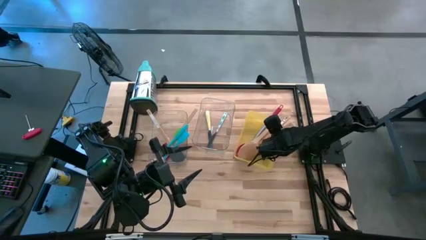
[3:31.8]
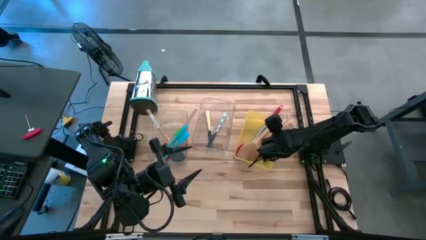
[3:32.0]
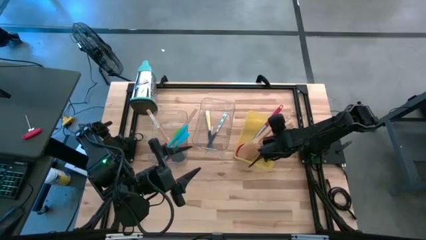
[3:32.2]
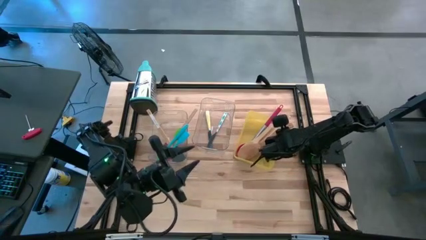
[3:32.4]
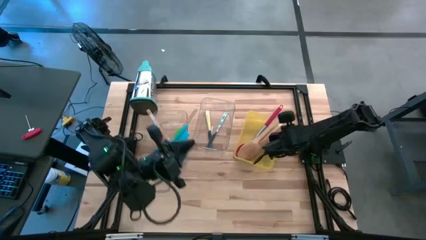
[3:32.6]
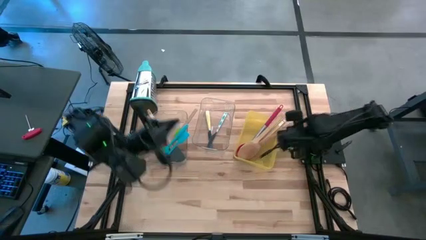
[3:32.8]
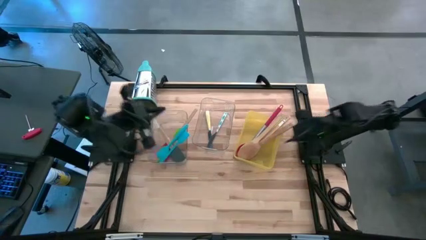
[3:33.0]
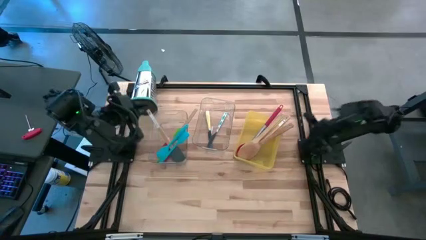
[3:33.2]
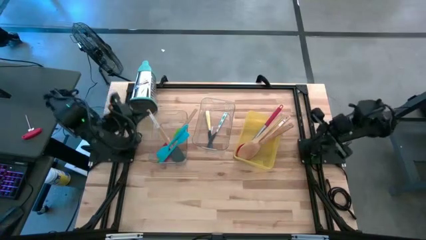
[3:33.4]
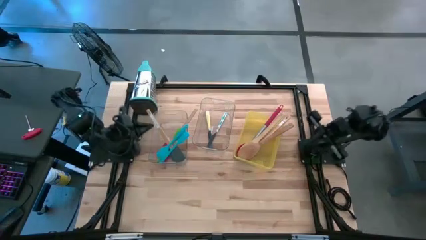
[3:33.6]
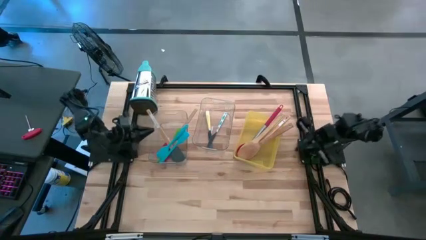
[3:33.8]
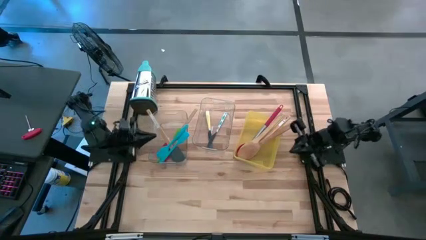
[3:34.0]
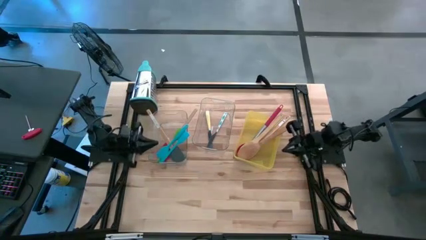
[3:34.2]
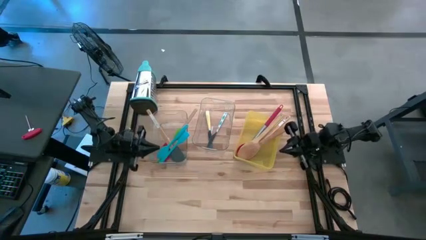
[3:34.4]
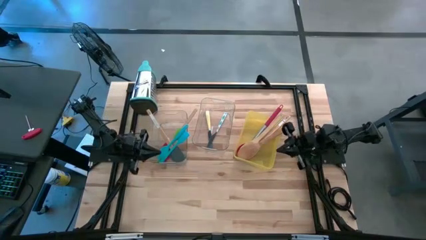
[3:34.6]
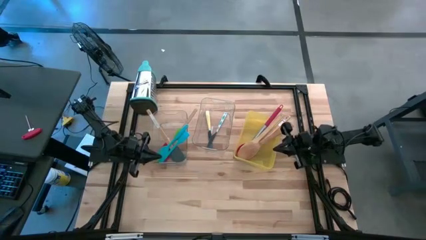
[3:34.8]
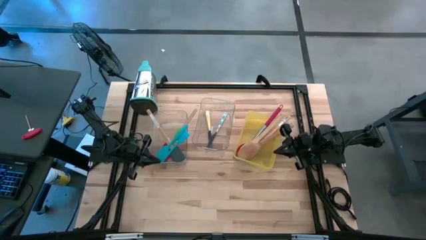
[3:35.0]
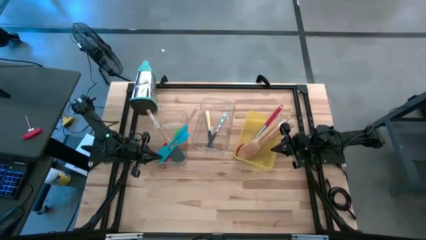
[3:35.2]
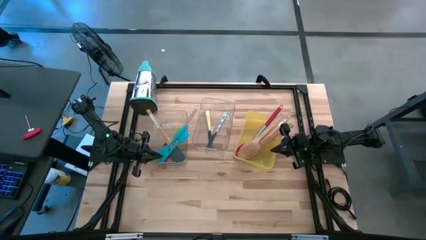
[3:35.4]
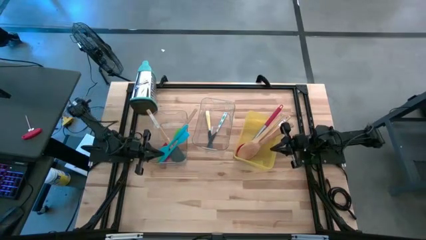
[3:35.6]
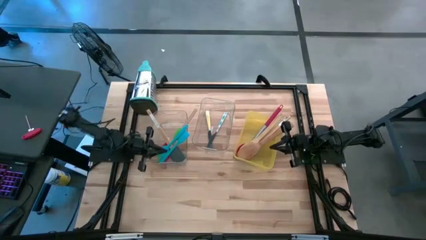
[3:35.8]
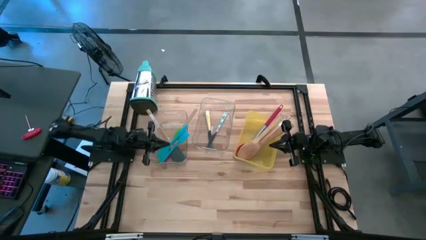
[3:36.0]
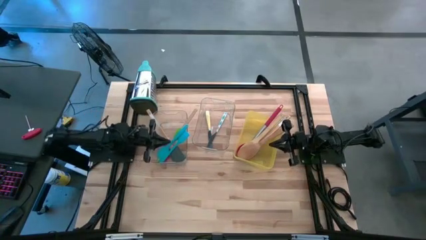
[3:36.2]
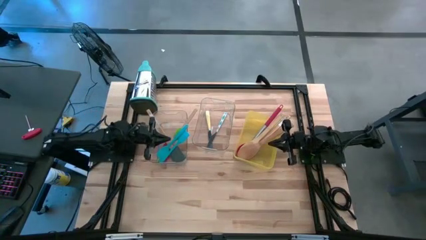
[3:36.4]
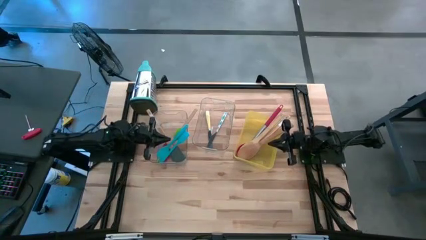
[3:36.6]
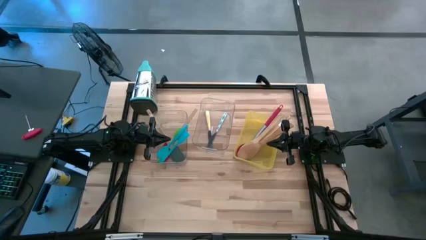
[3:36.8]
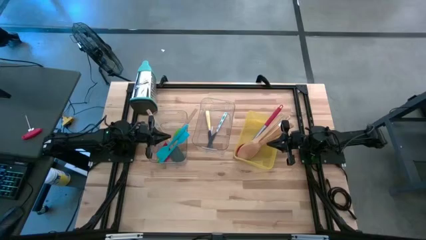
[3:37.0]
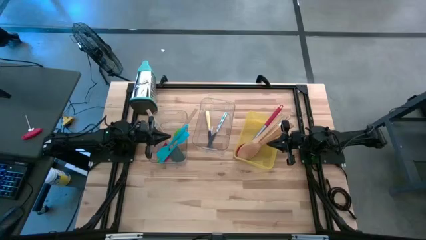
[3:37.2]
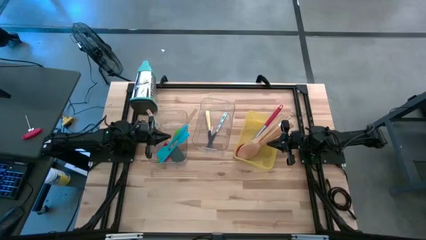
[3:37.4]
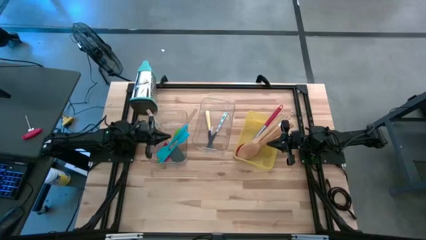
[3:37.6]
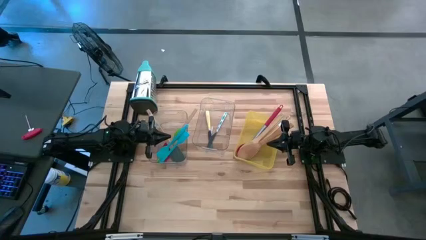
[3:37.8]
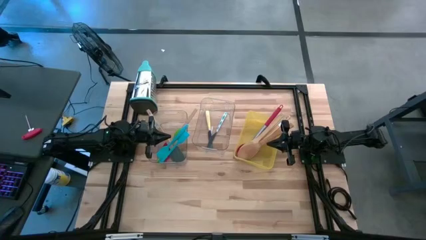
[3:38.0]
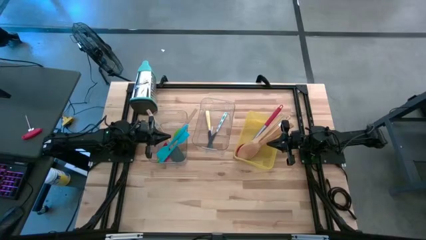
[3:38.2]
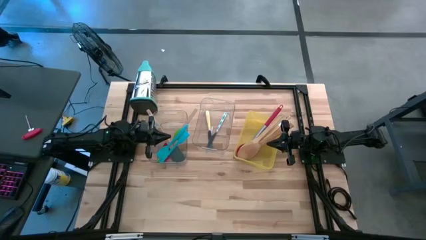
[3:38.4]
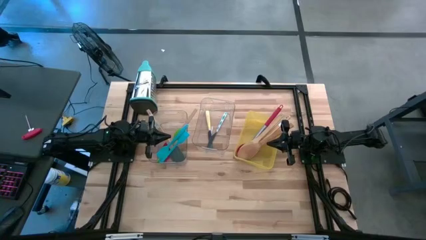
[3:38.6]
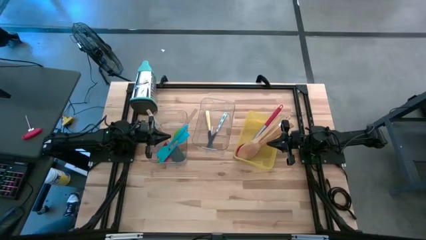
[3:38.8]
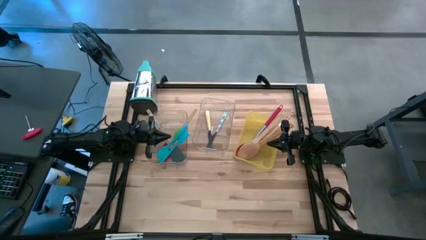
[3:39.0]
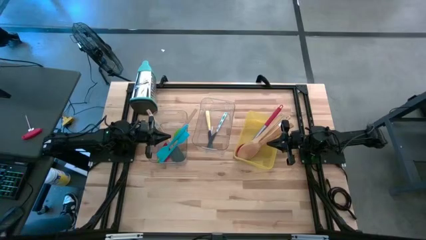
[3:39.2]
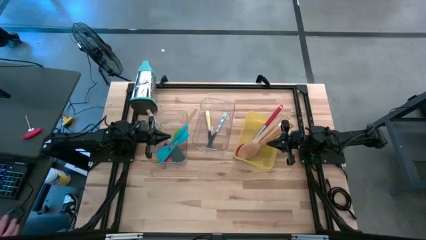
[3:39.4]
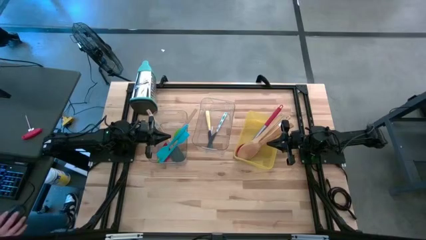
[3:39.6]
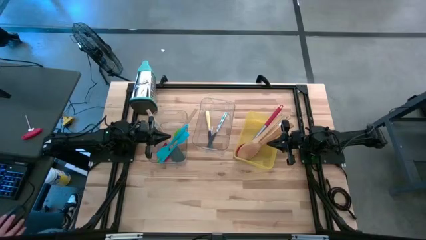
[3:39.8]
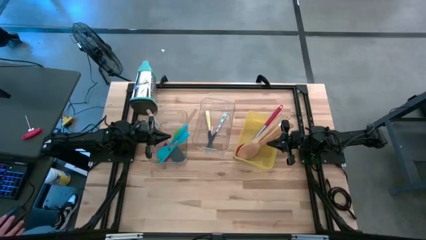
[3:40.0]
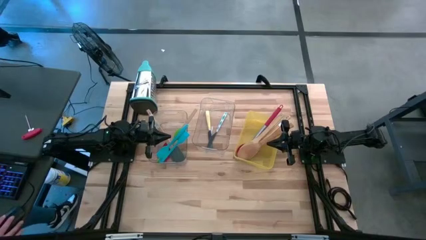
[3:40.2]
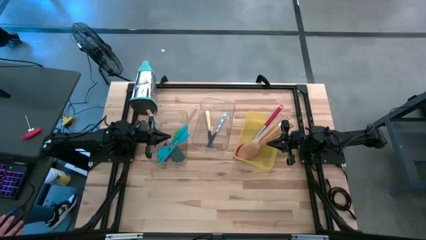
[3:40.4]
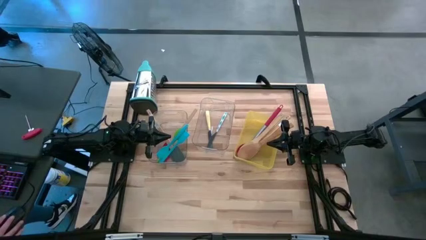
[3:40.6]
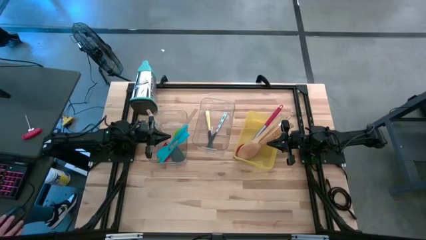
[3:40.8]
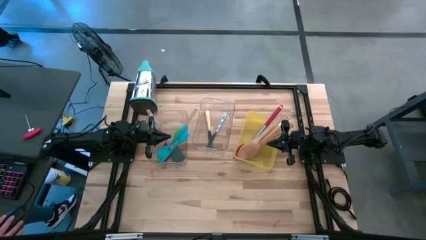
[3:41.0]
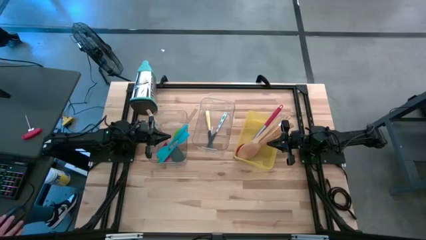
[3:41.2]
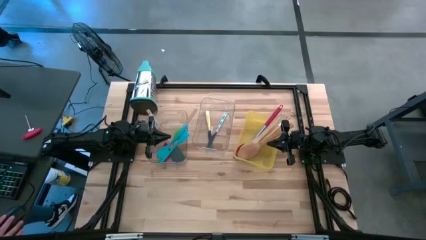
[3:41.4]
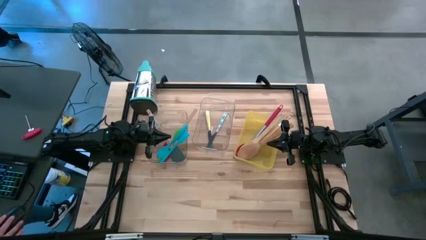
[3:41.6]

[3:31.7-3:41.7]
Task: Pick & Place Kitchen Items
Return to Home Position
